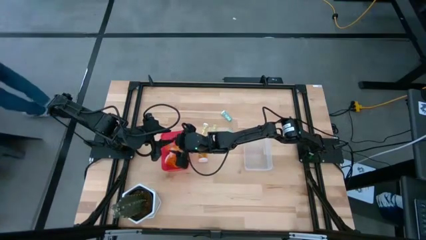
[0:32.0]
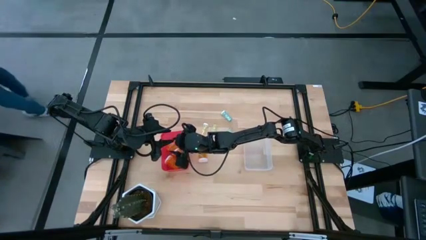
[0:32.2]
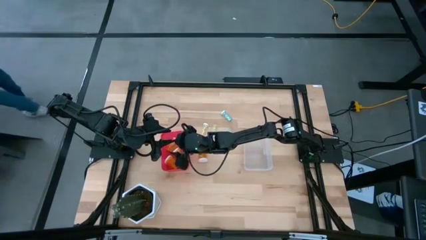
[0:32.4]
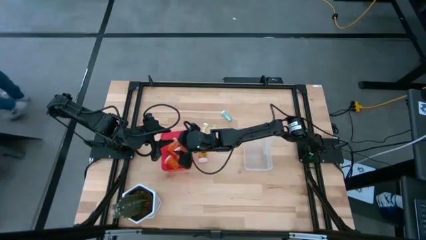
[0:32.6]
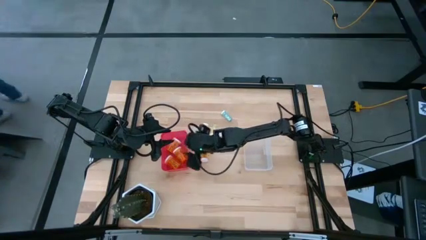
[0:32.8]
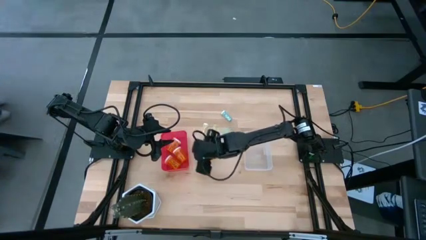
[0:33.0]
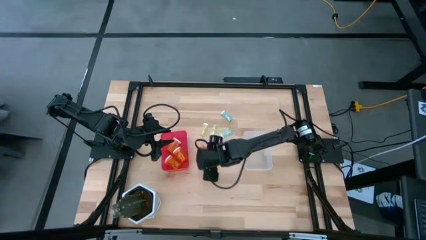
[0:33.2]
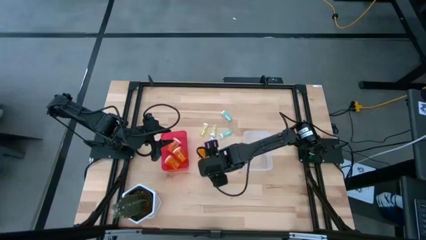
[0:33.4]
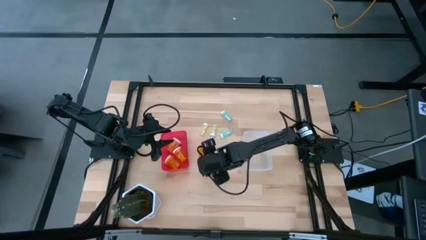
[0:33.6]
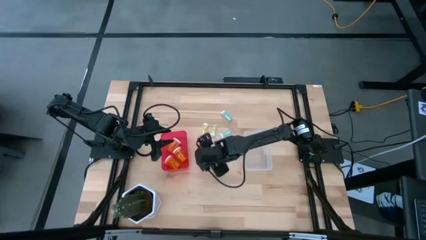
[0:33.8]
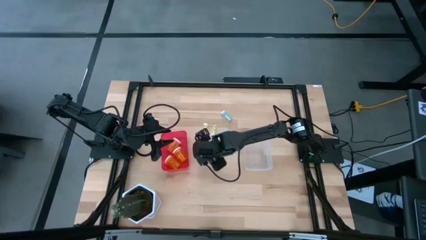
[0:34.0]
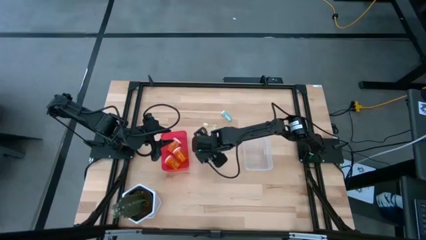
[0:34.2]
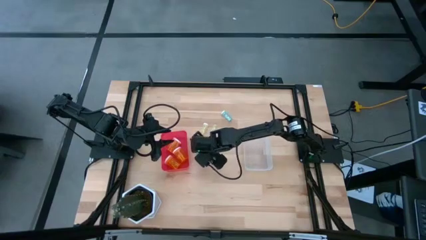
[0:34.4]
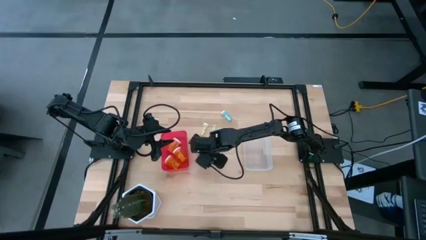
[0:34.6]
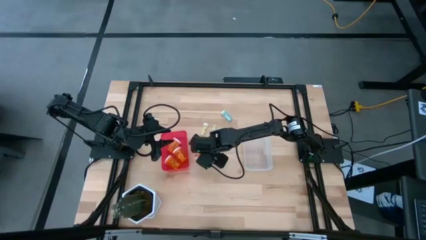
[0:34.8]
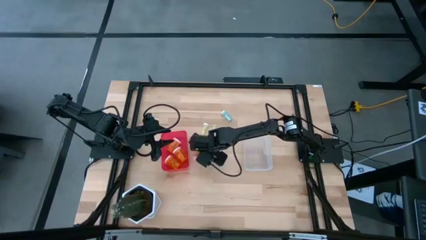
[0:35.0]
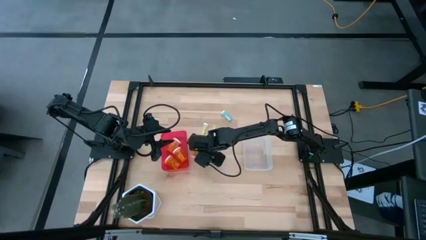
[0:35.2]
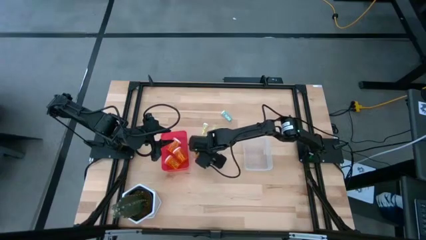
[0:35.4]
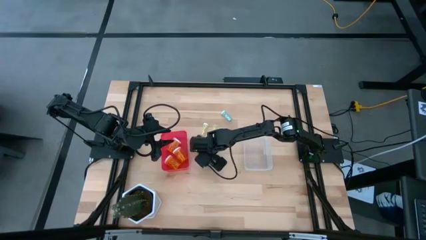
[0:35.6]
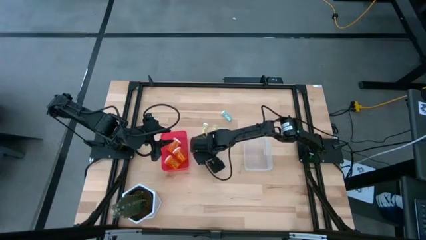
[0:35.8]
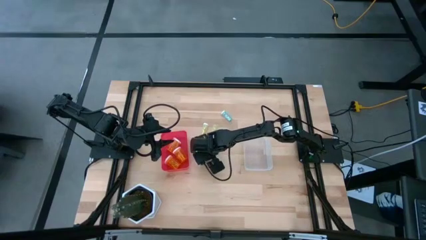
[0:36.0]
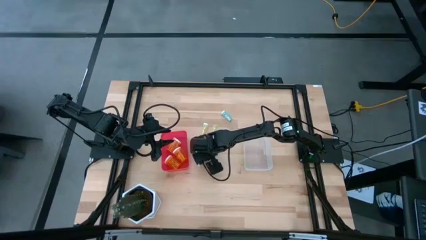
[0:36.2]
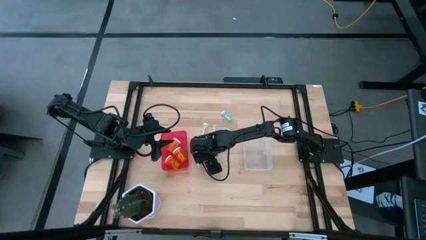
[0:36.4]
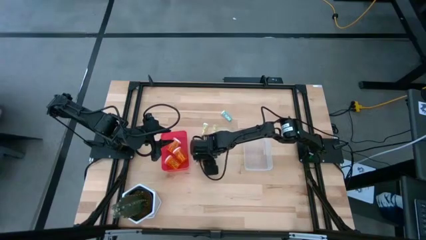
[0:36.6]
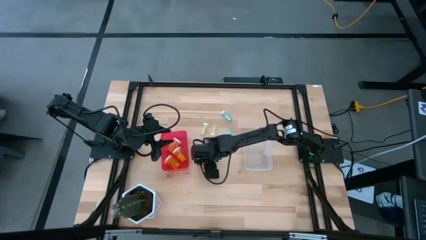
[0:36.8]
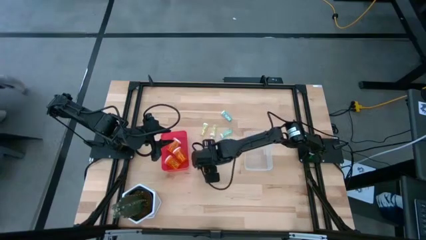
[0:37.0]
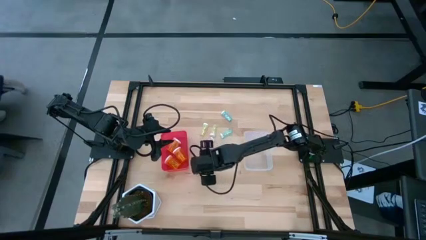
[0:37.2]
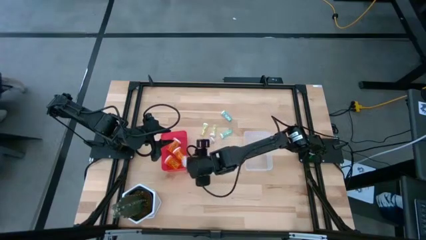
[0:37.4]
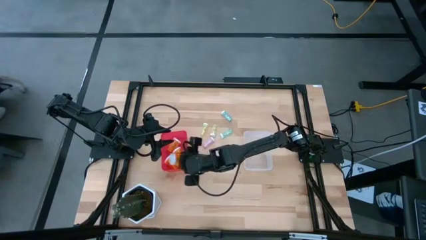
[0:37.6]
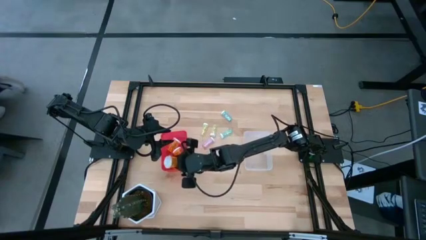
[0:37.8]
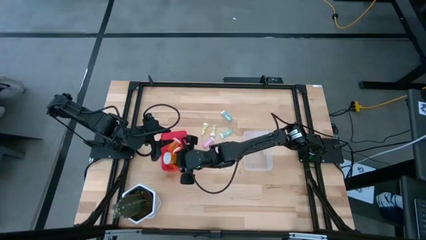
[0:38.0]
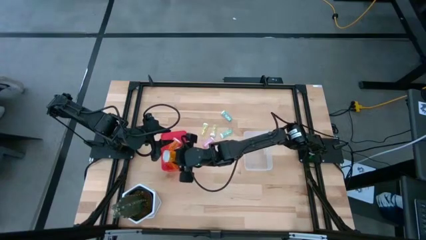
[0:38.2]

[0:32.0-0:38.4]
Task: Pick and place medicine bottles into bin by pill shape (circle, oval)
Put the big orange pill bottle into the red bin

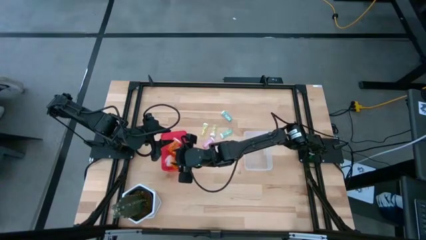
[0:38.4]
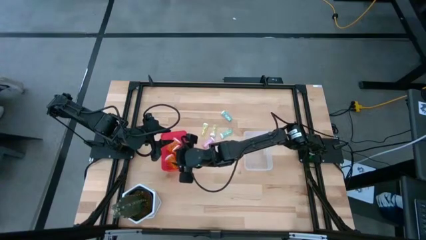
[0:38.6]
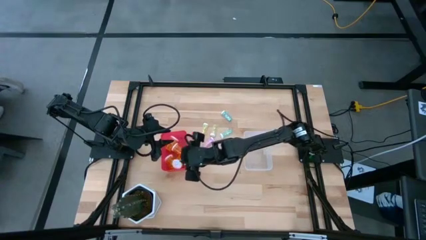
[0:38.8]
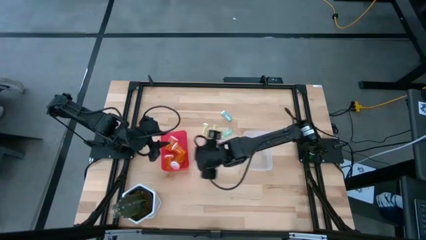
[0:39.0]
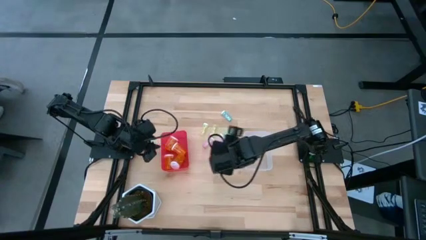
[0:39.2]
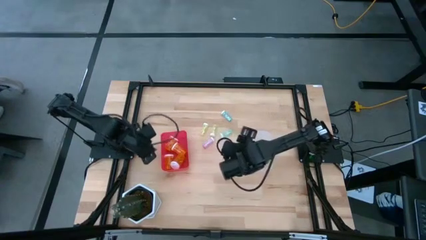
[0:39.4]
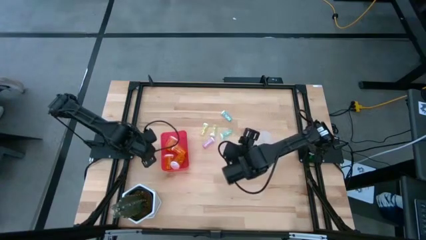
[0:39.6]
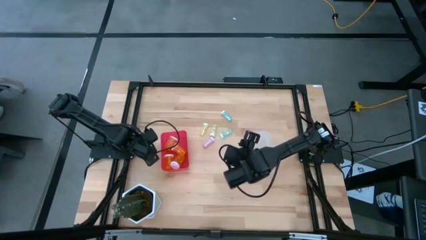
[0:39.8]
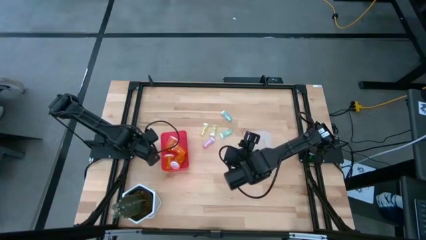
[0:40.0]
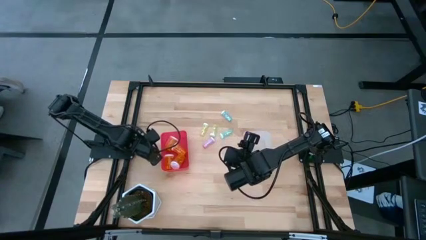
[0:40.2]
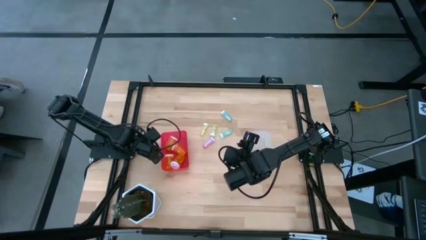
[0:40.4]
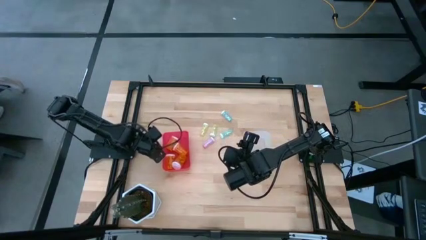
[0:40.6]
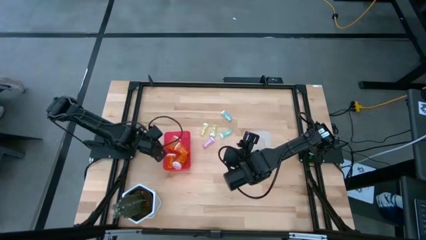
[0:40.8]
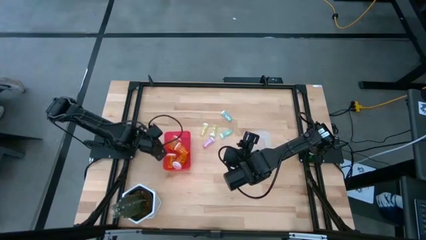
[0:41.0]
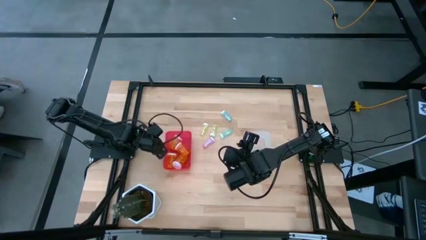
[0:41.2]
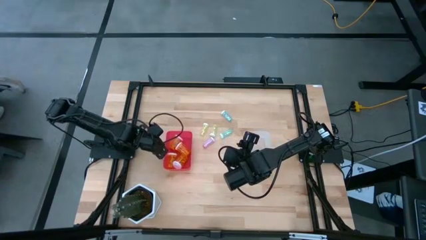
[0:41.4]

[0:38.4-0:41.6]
Adjust the red bin on the table

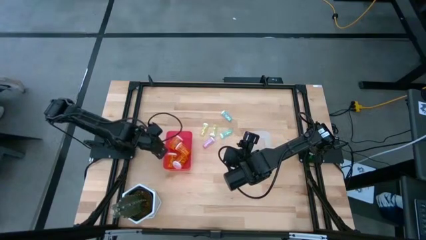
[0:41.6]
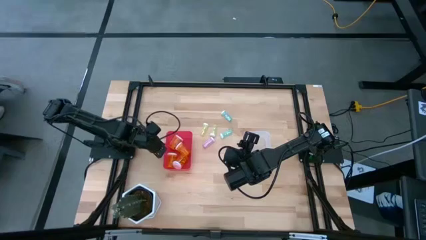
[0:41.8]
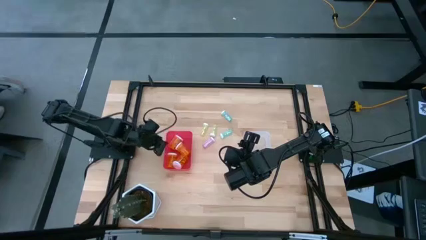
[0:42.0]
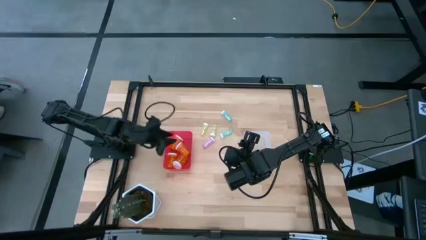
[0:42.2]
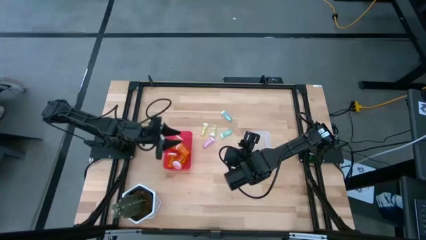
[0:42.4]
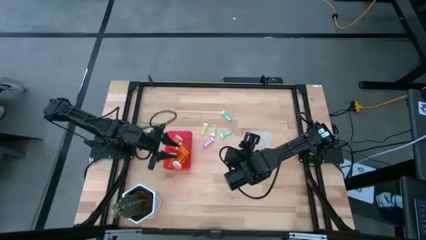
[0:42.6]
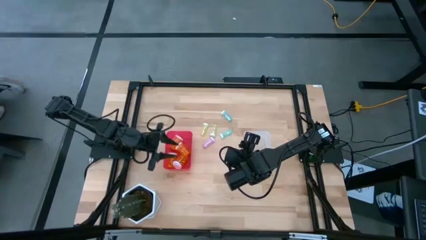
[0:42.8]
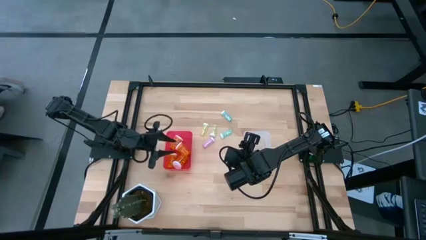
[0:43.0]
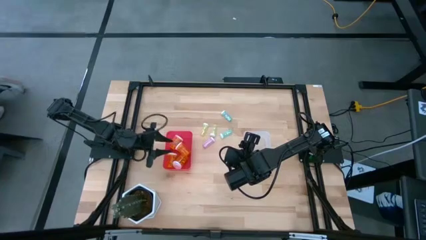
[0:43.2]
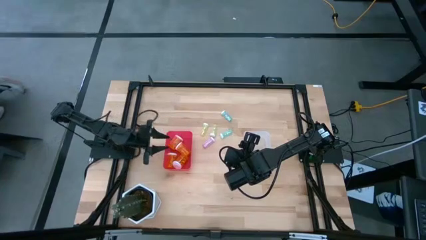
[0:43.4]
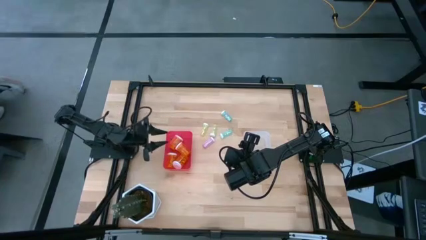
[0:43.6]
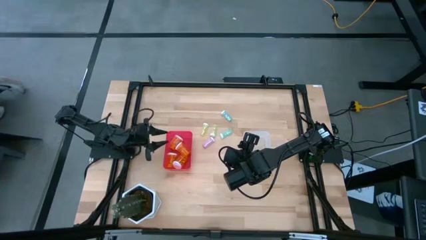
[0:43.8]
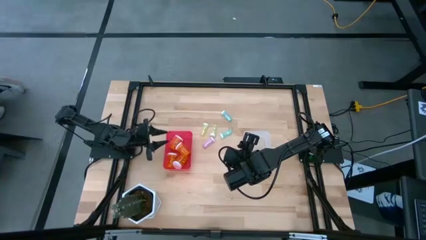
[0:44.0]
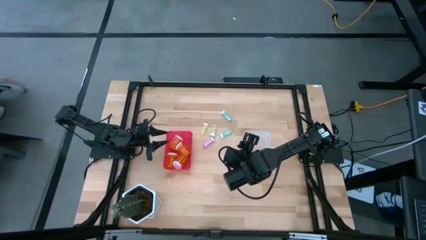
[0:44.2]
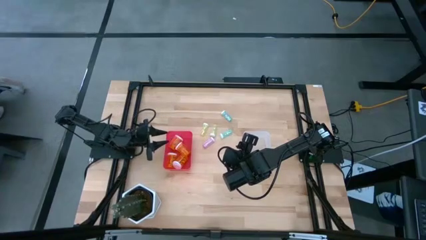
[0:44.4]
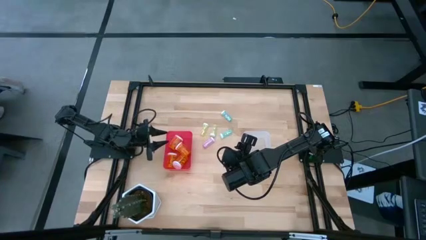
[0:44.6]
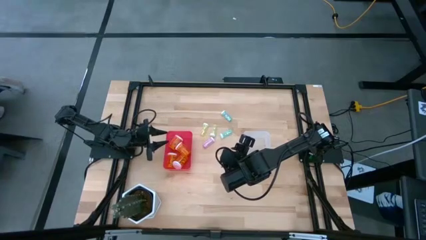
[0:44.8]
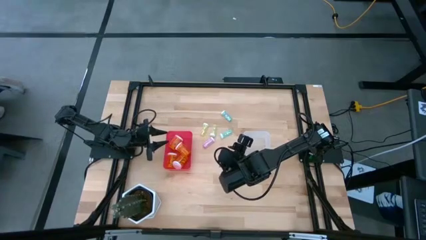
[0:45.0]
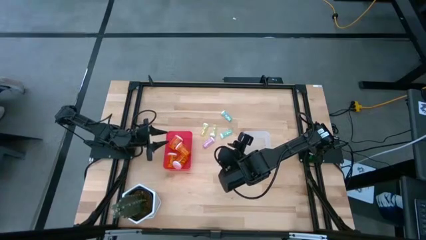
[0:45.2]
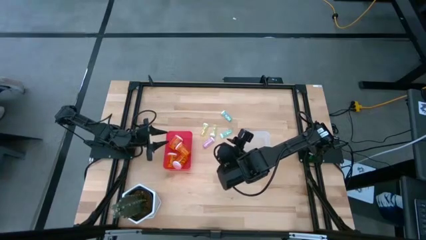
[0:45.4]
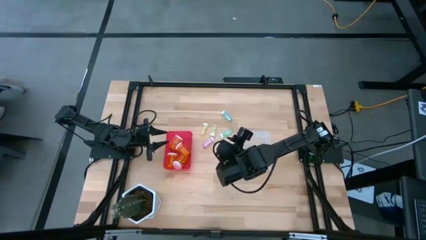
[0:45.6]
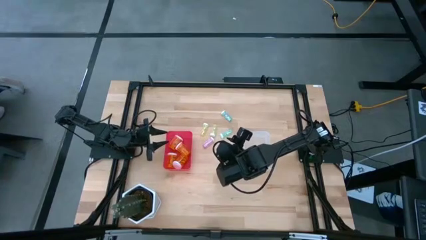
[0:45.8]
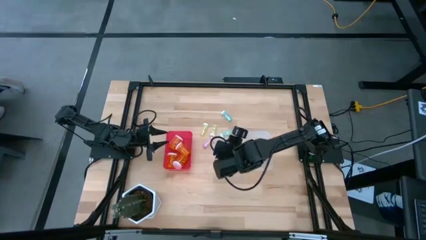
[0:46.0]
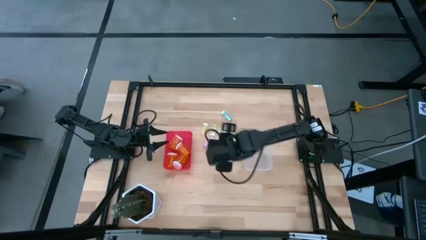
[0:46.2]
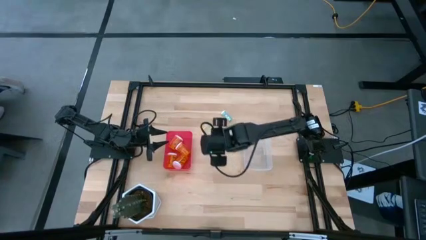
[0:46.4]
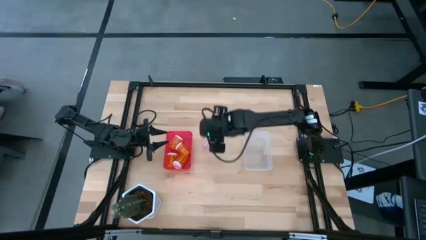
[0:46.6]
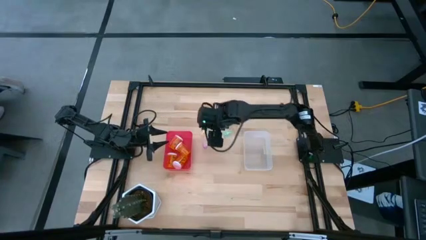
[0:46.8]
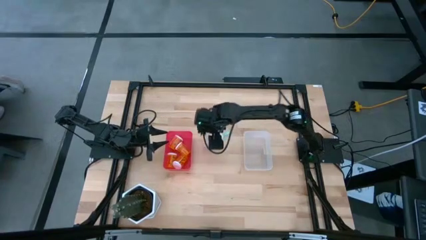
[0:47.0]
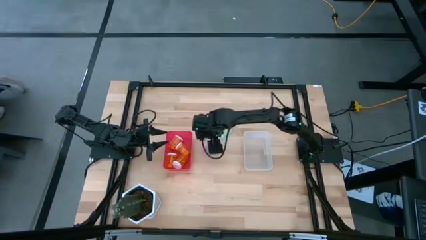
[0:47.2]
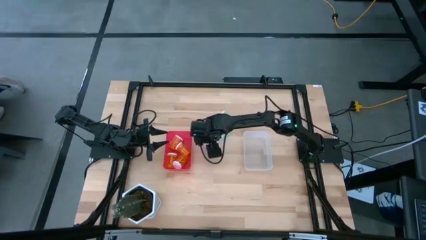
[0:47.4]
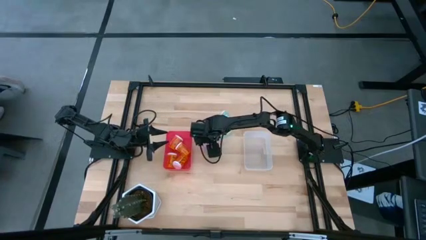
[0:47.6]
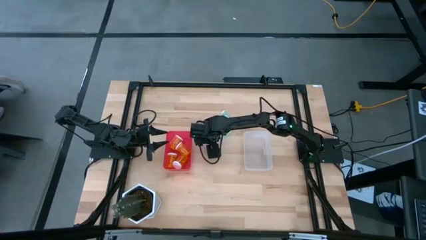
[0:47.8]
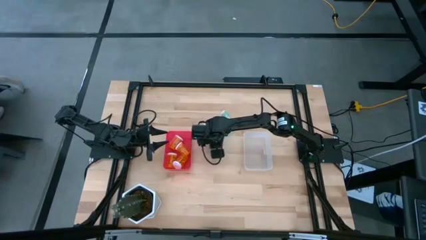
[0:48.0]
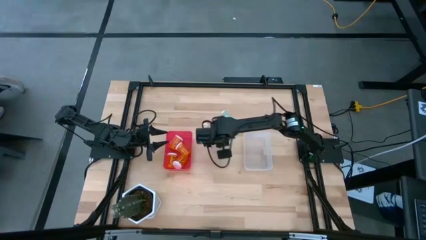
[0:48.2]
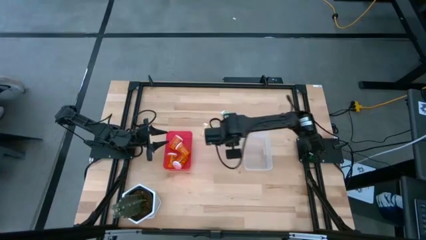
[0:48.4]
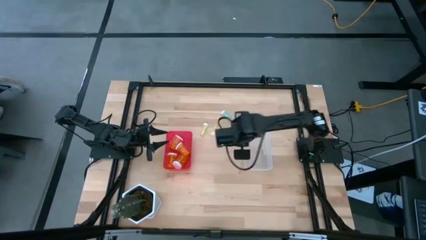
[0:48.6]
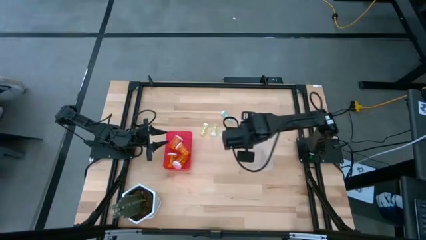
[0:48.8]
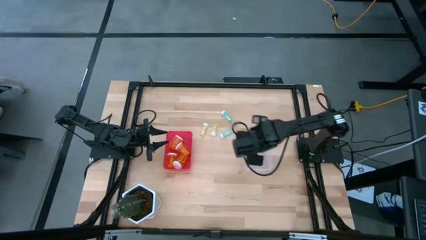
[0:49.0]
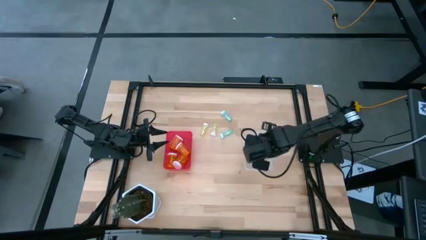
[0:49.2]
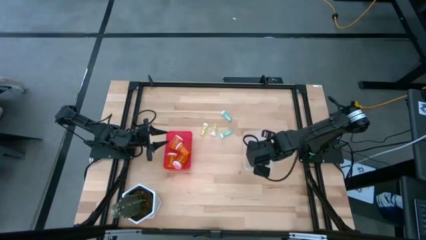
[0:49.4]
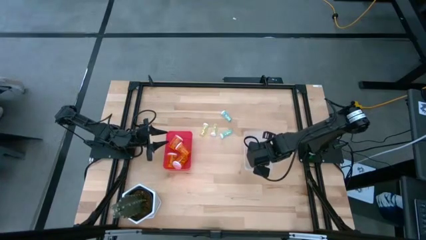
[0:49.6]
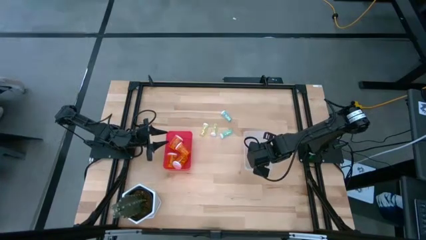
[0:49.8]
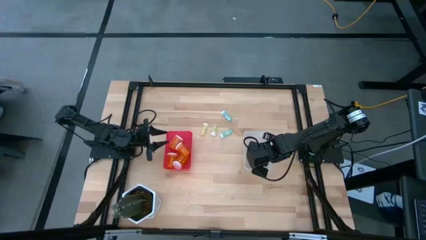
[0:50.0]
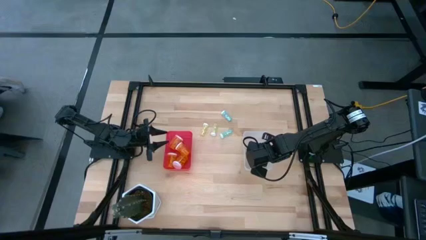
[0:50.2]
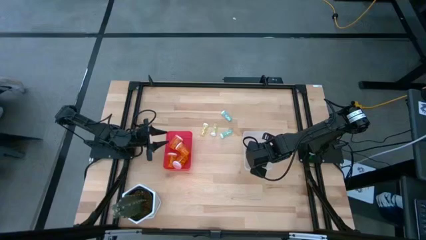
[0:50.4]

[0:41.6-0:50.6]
Put the small purple pill bottle into the transparent bin
